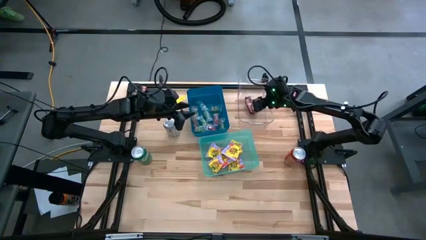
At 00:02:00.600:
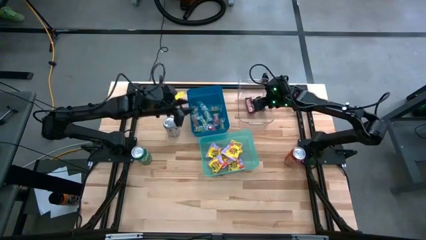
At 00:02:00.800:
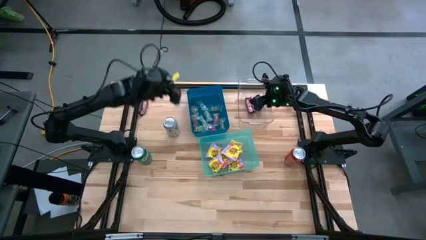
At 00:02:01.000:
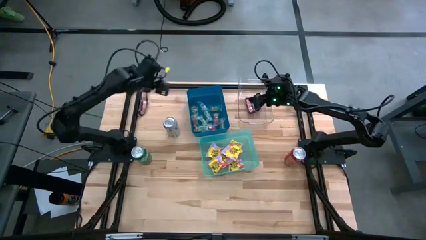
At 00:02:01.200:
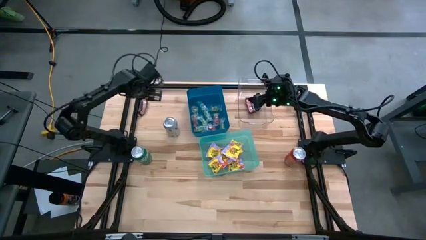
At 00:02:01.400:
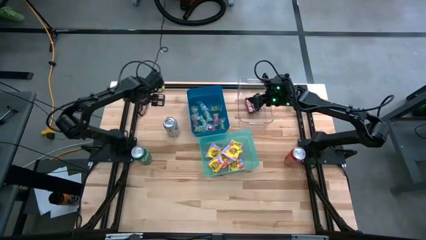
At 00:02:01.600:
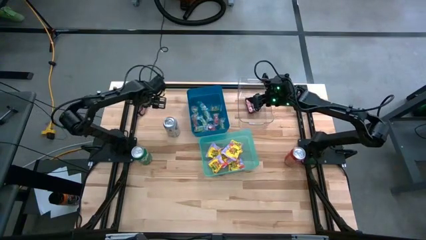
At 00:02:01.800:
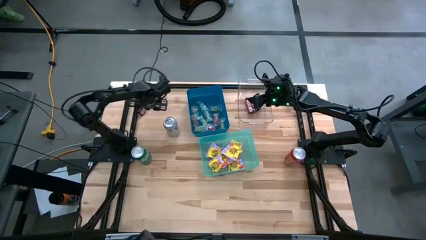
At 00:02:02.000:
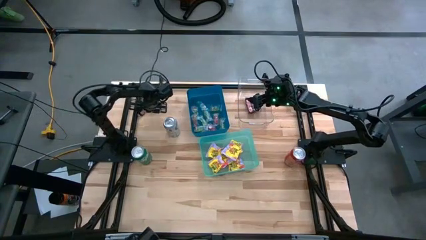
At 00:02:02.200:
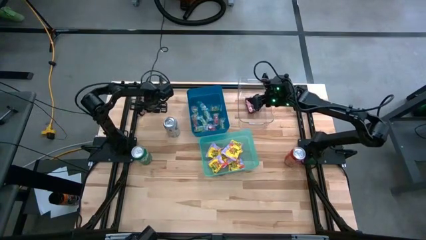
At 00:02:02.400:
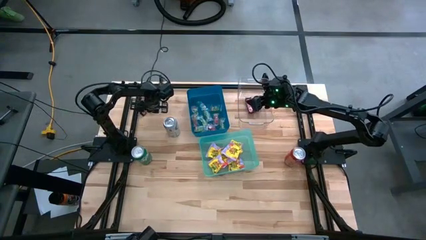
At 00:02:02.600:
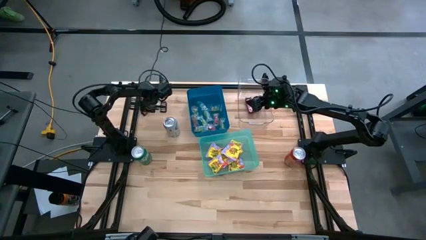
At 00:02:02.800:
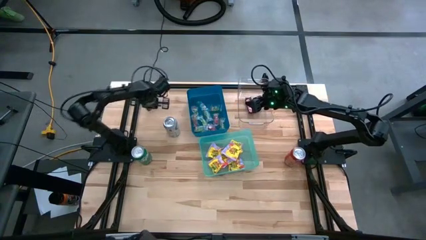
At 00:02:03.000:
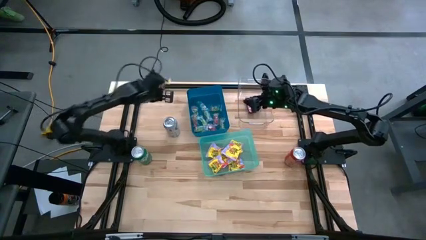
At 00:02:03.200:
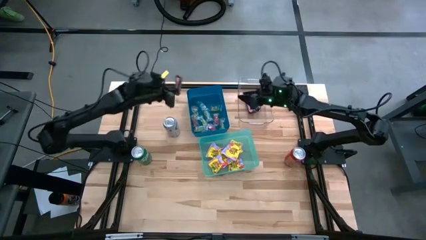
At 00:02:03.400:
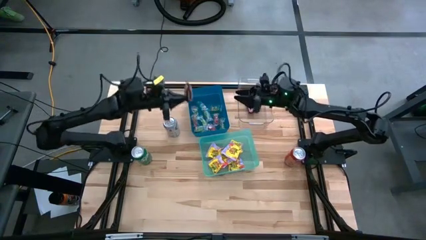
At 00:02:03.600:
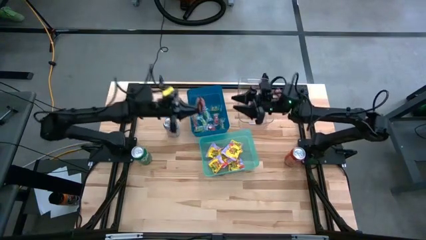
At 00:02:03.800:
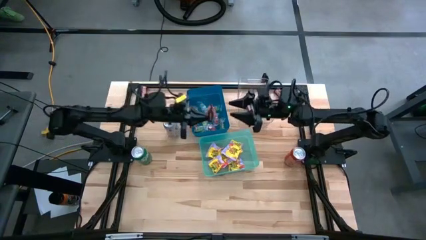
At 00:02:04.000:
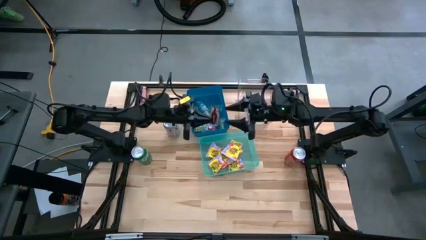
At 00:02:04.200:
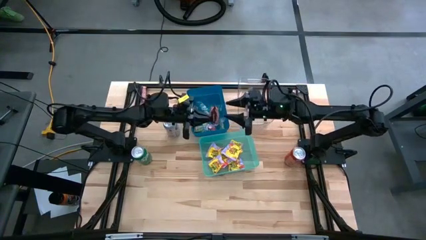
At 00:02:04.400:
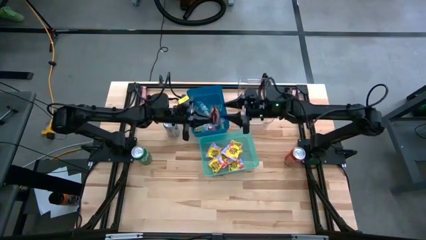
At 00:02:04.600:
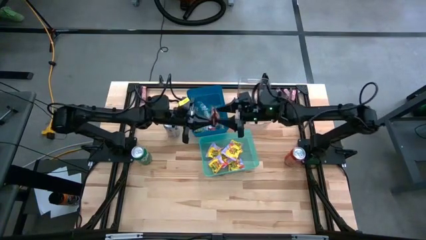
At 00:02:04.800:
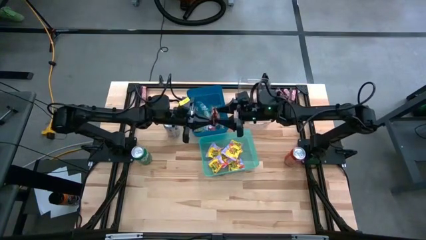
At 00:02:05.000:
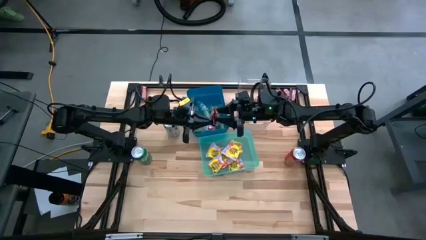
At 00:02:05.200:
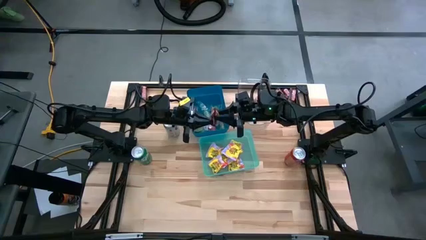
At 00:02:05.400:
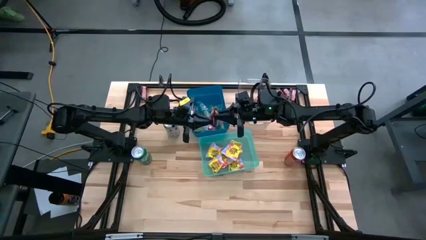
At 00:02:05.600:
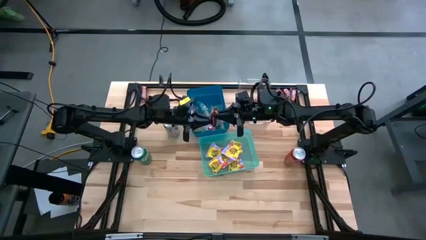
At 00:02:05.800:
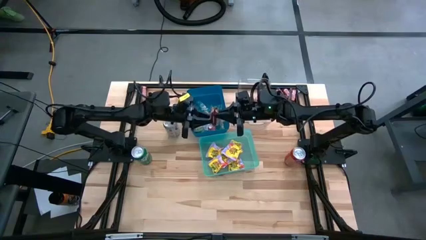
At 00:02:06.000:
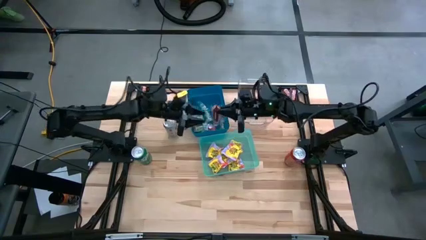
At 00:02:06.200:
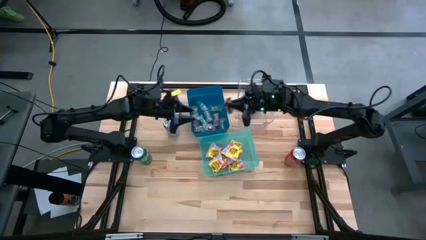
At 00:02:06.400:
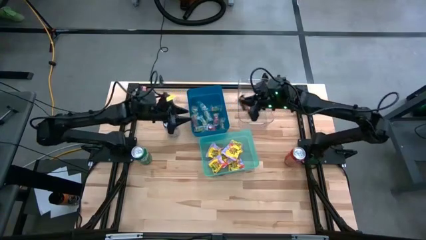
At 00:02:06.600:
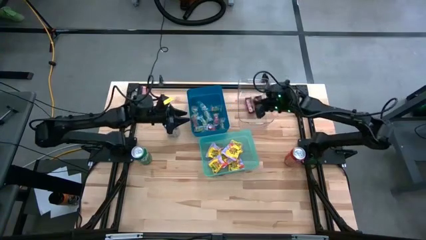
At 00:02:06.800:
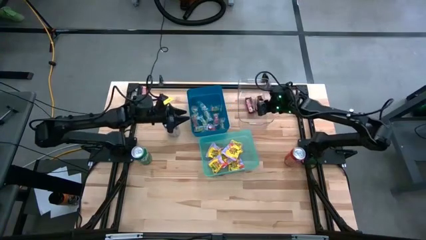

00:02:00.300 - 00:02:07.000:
Task: Sort candy
Put the brown candy into the transparent bin

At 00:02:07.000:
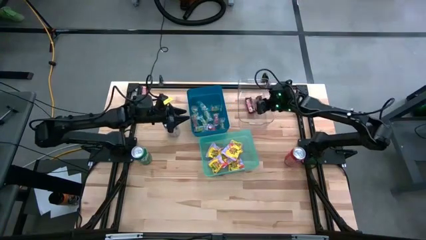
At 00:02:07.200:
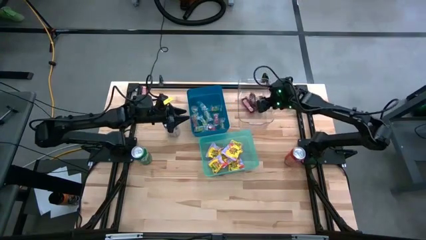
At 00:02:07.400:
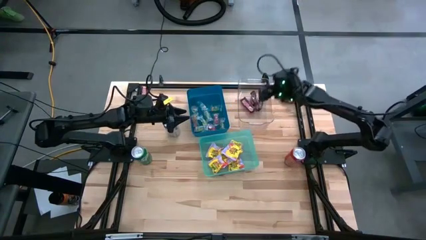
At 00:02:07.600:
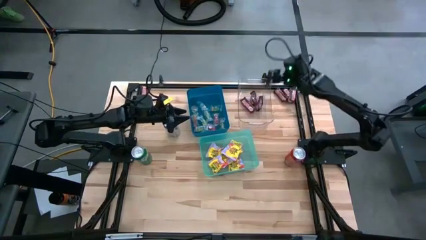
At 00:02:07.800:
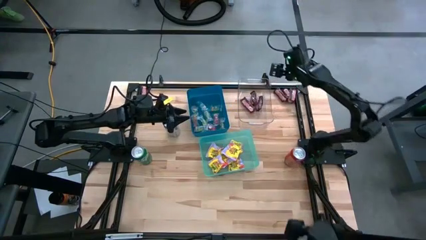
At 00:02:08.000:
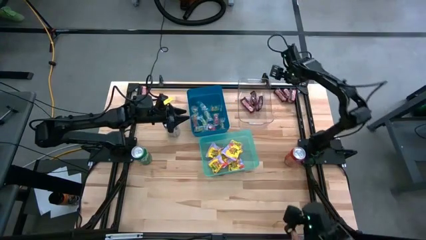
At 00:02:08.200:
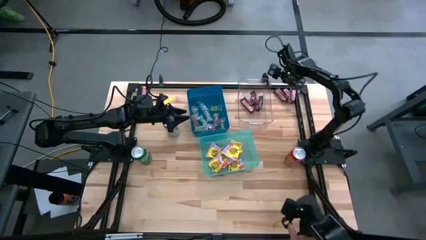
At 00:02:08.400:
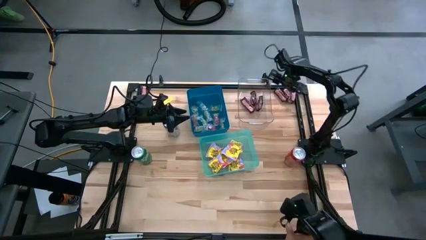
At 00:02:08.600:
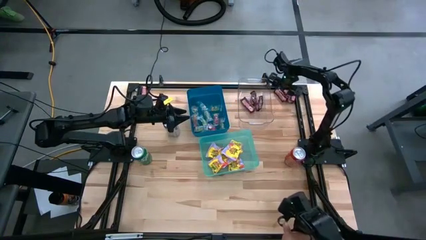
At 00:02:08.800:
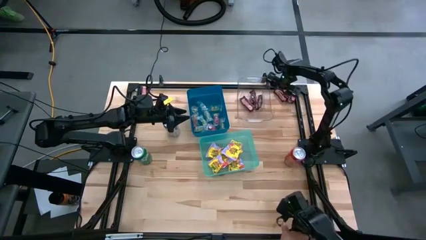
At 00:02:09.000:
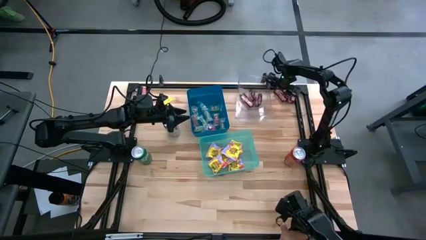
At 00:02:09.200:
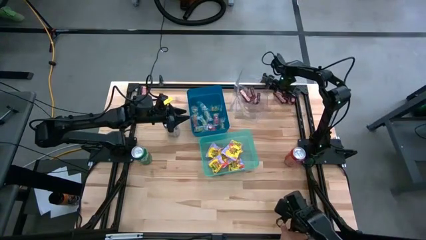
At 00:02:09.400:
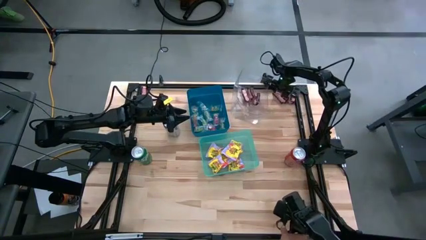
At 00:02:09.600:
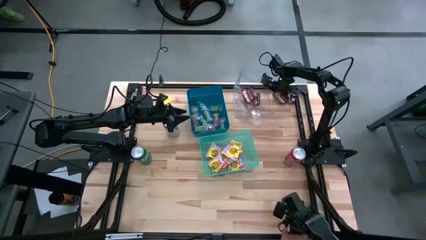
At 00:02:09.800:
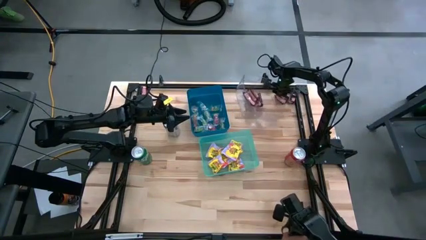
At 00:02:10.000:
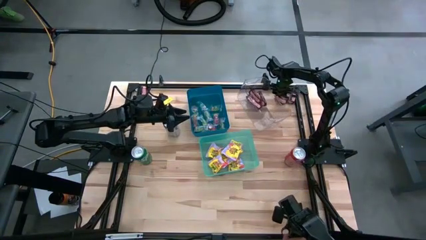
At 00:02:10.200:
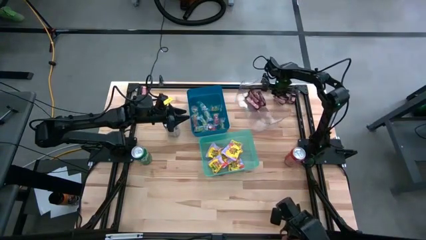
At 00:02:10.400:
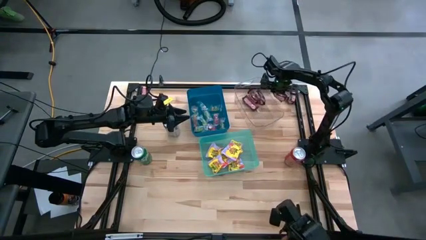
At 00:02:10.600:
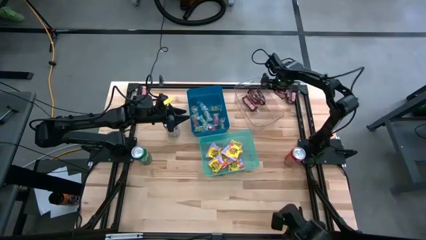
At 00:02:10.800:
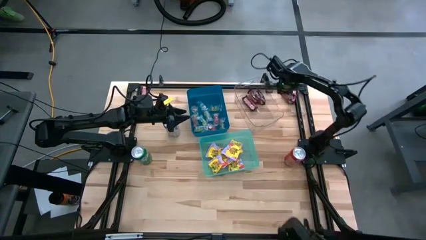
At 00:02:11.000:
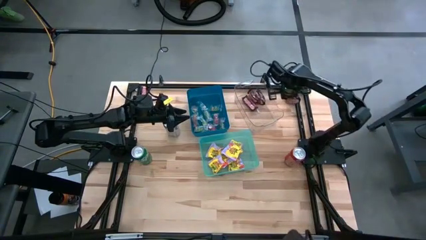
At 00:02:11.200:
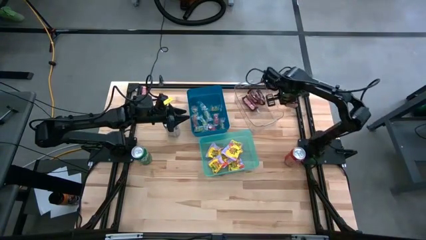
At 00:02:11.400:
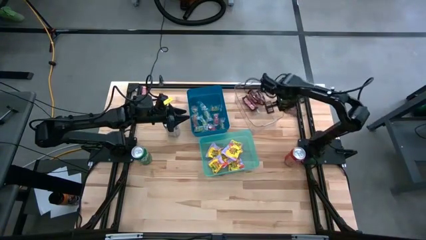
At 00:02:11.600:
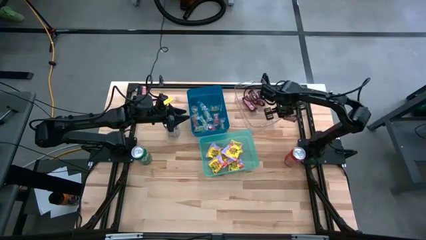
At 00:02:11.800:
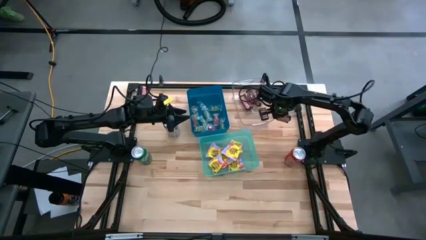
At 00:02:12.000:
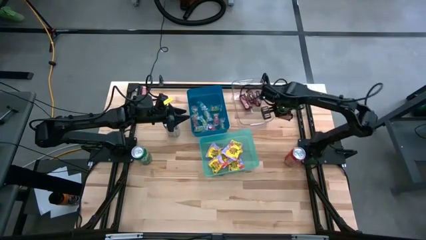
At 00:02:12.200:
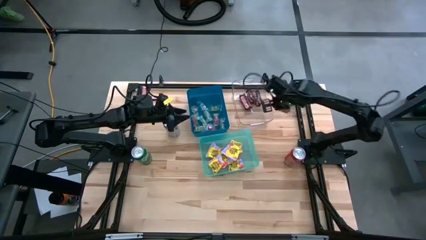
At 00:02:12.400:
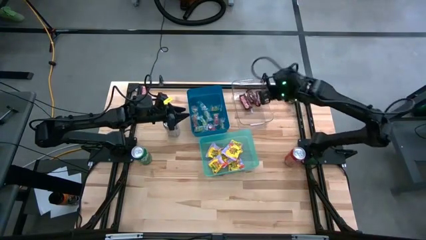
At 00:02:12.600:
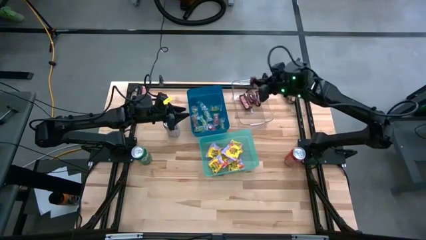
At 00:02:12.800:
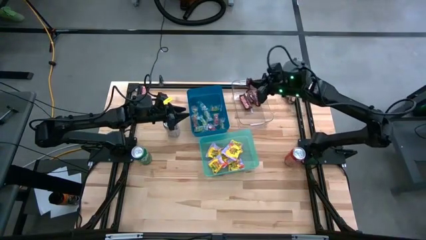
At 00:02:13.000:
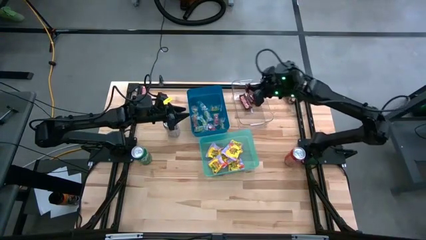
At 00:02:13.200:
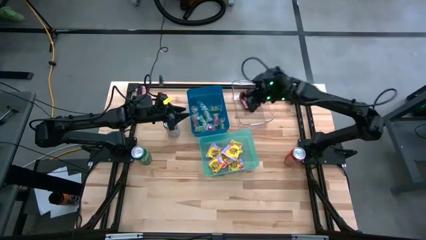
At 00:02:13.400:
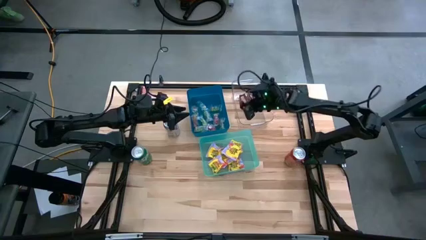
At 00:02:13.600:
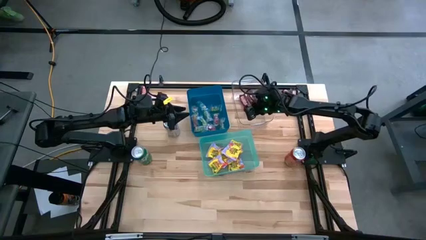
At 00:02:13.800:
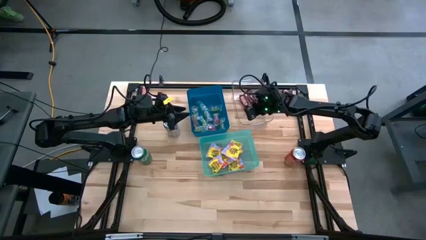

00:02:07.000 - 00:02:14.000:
Put the brown candy into the transparent bin

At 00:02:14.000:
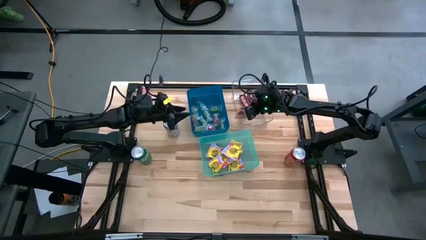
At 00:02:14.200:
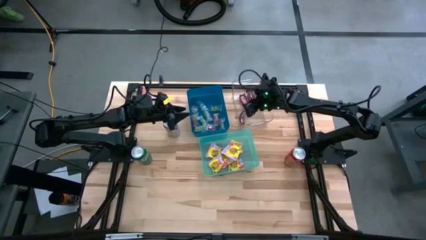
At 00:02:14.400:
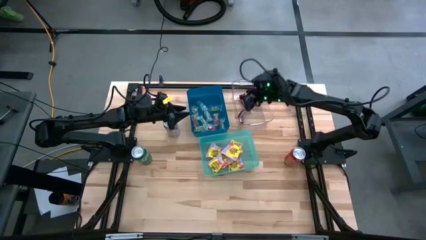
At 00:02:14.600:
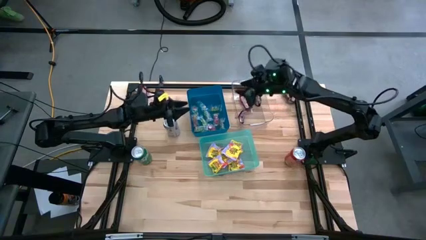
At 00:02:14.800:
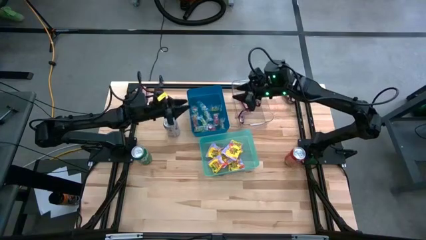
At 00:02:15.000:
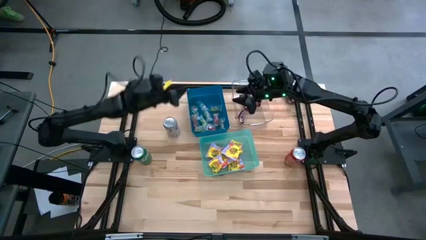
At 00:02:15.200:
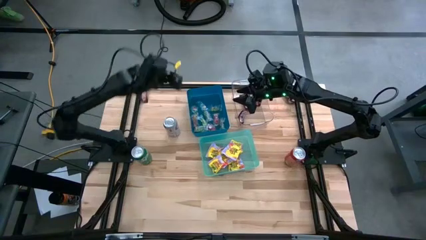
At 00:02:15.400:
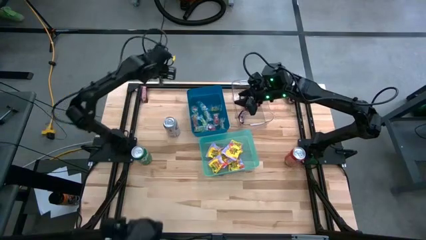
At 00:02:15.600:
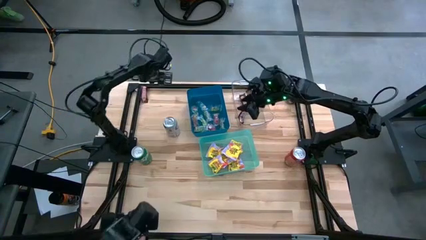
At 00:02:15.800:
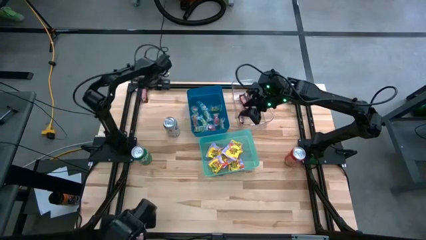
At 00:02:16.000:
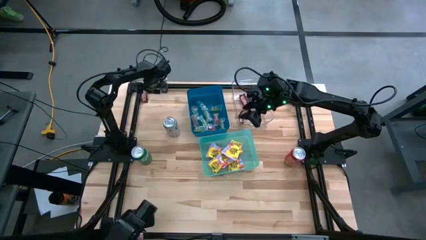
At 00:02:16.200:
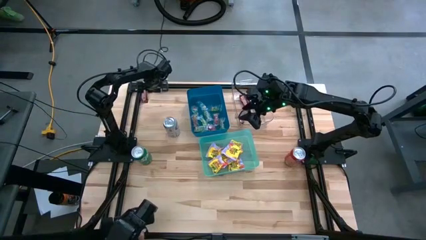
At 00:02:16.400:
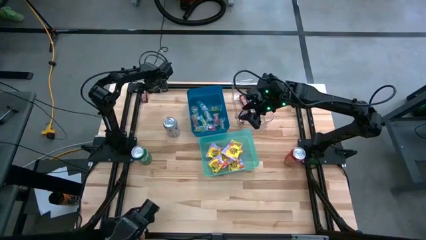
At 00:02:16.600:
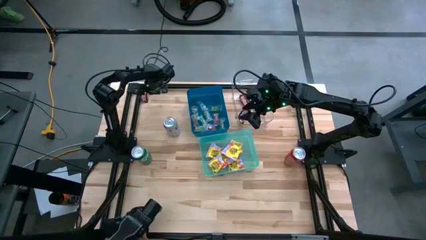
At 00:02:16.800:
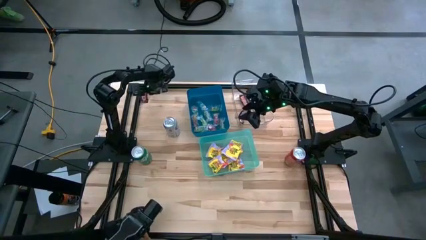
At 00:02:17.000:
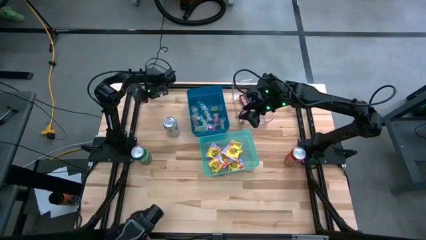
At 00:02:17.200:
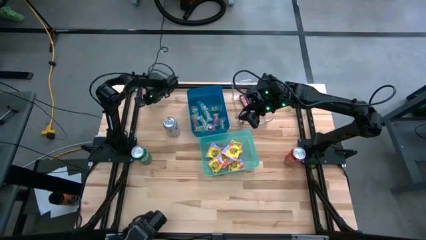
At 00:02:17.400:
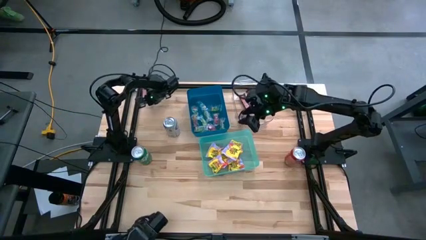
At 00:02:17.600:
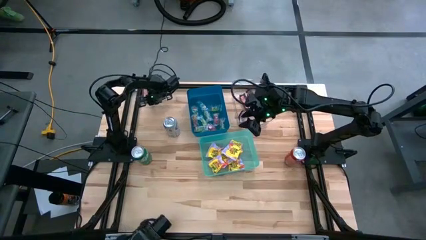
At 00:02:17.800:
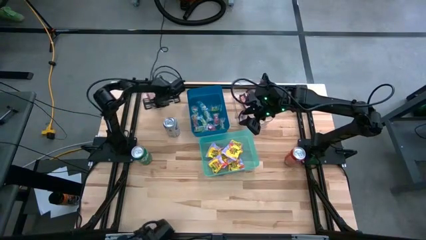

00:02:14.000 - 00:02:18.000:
Put the brown candy into the transparent bin
